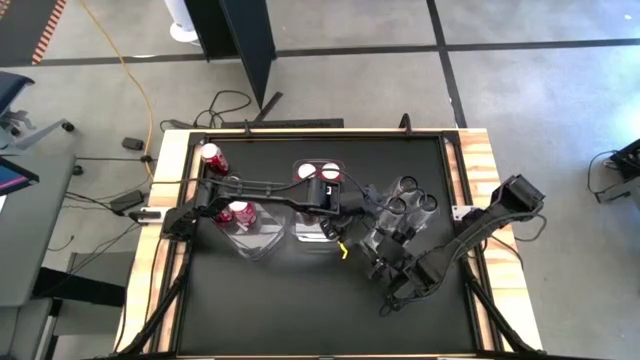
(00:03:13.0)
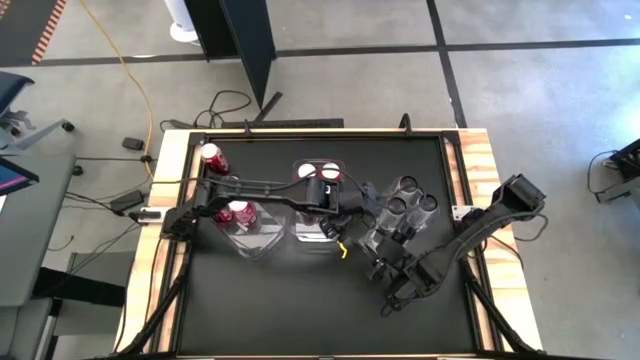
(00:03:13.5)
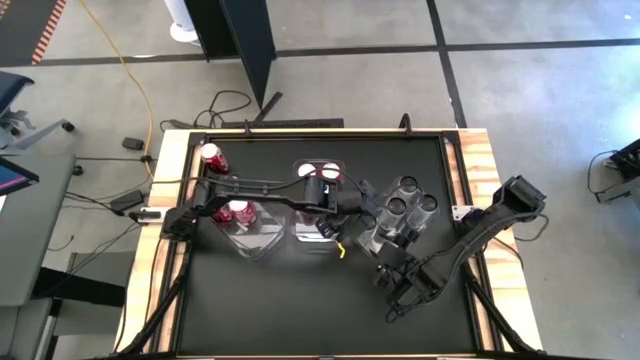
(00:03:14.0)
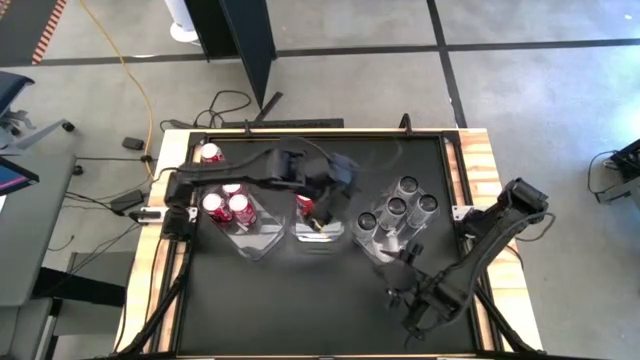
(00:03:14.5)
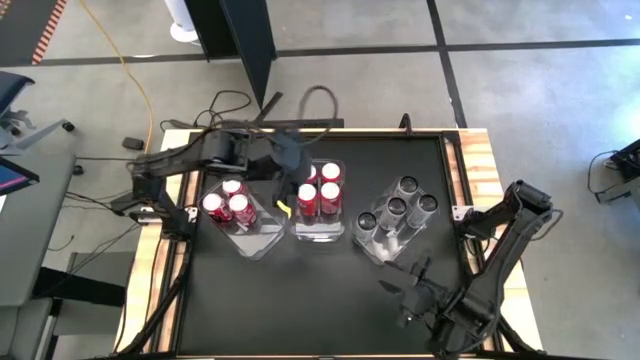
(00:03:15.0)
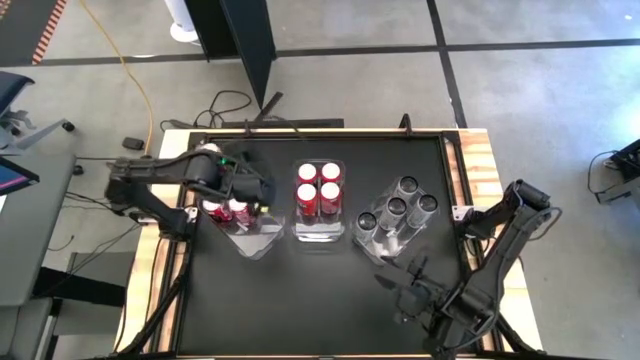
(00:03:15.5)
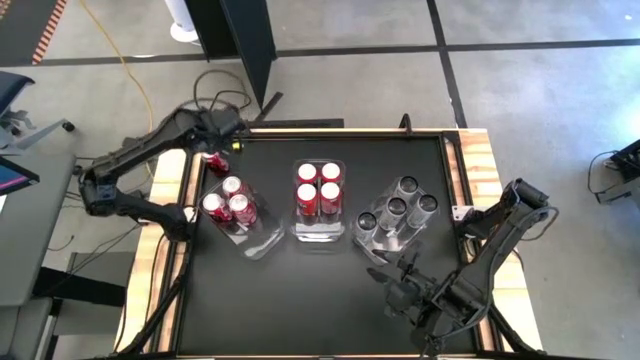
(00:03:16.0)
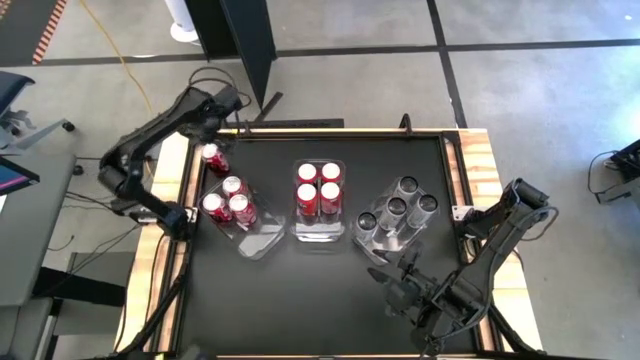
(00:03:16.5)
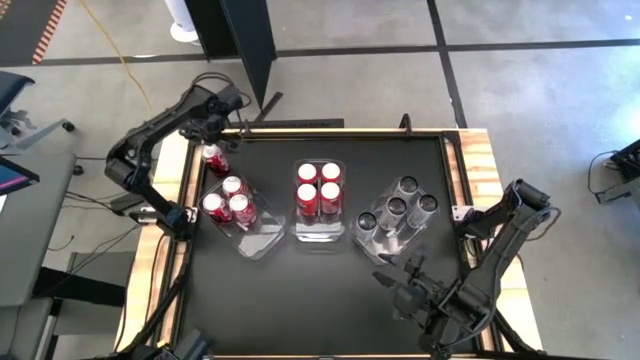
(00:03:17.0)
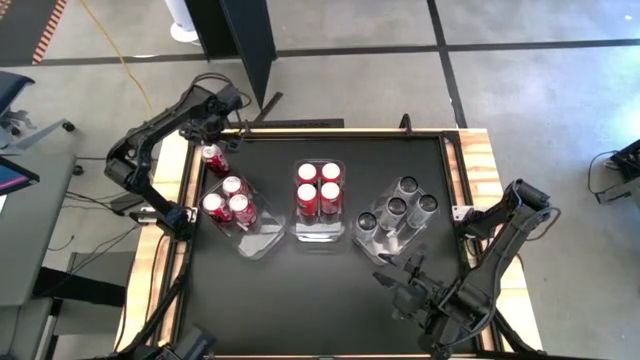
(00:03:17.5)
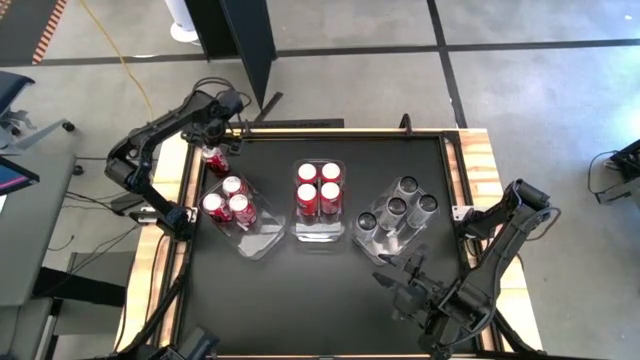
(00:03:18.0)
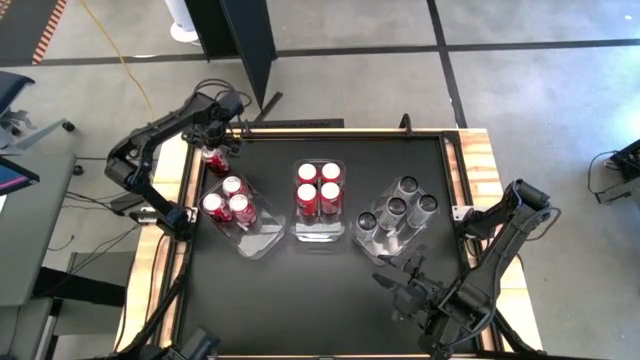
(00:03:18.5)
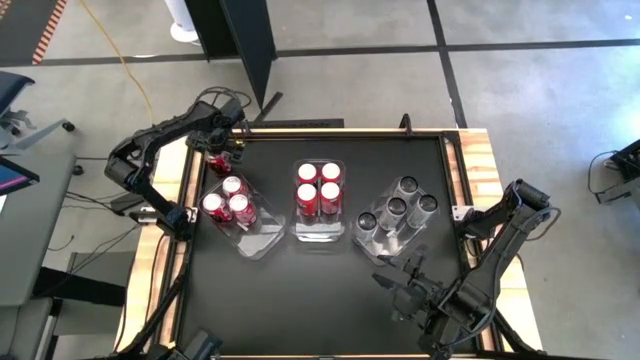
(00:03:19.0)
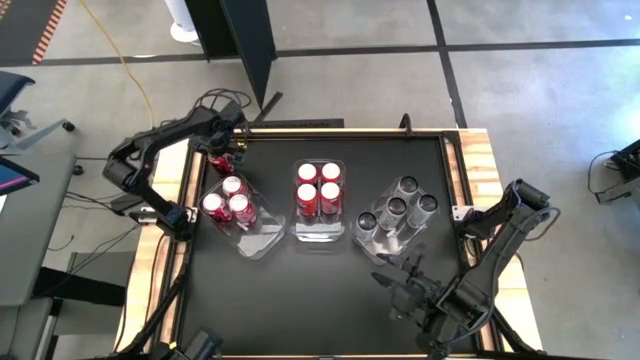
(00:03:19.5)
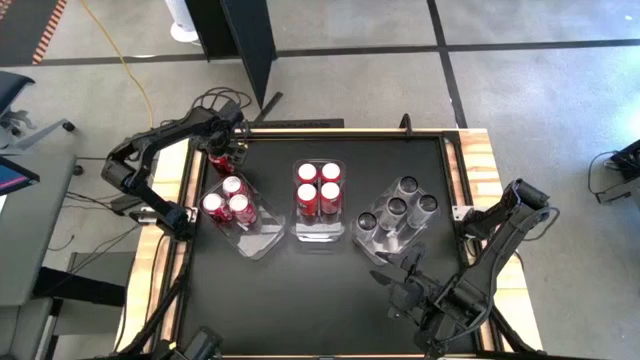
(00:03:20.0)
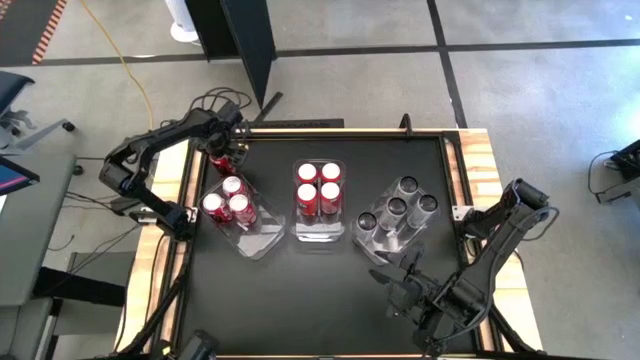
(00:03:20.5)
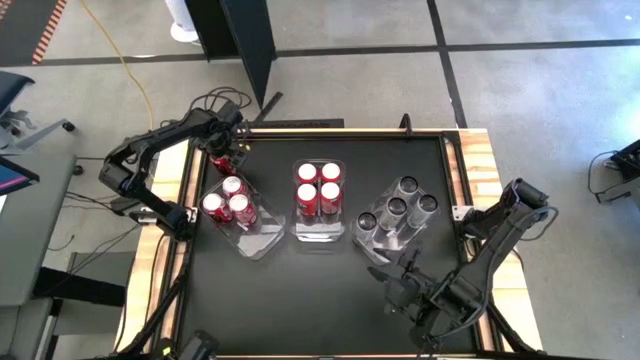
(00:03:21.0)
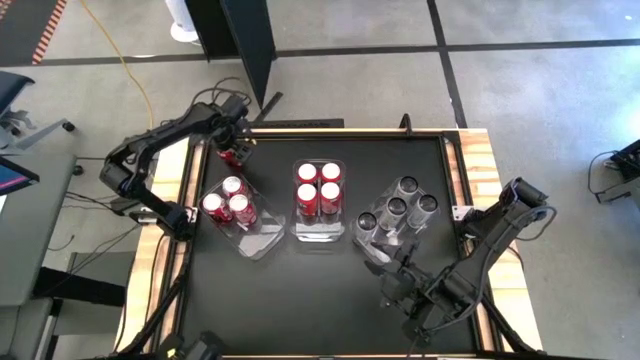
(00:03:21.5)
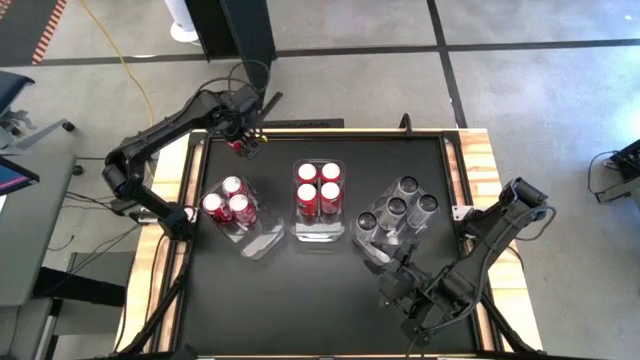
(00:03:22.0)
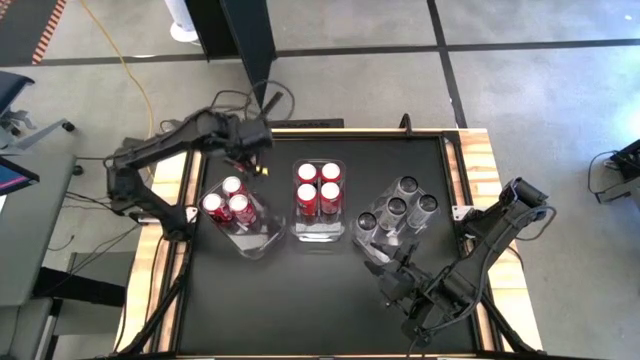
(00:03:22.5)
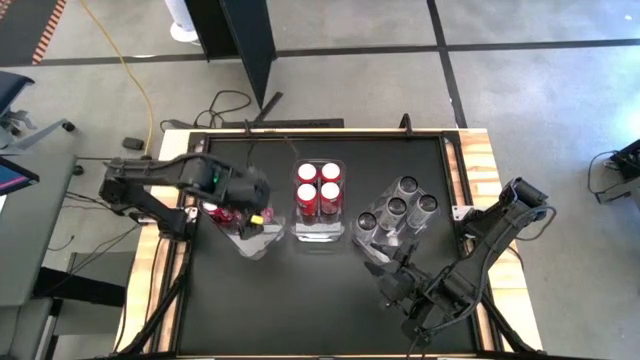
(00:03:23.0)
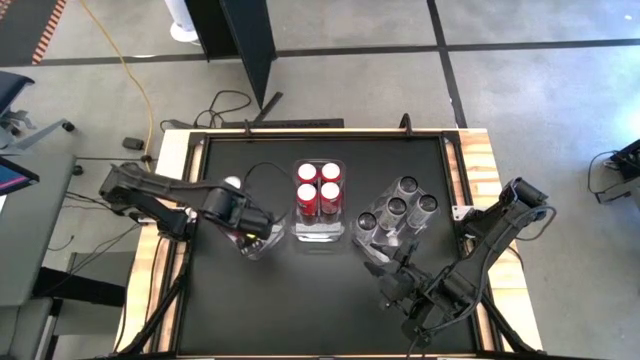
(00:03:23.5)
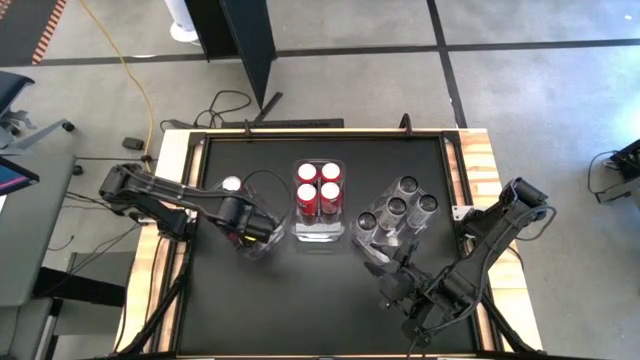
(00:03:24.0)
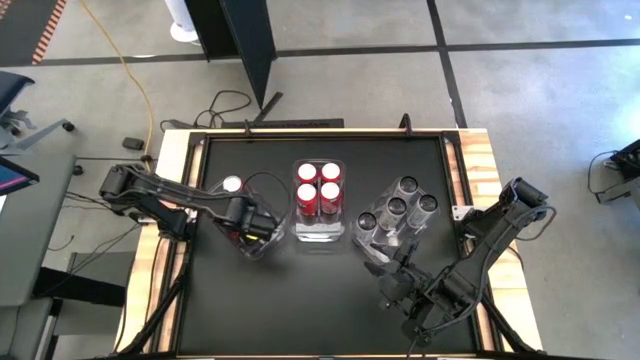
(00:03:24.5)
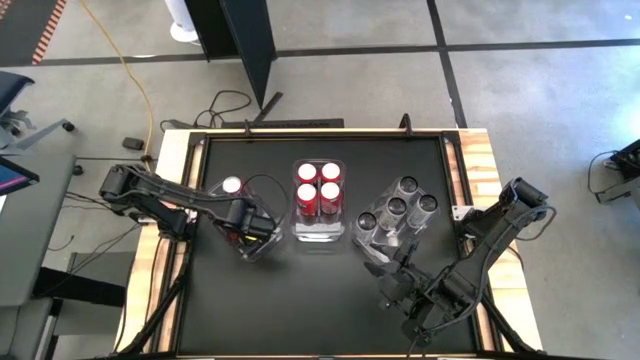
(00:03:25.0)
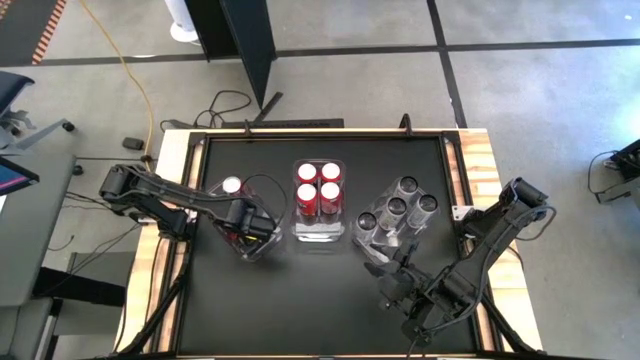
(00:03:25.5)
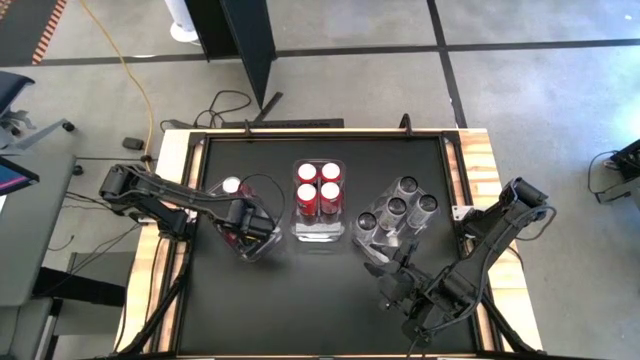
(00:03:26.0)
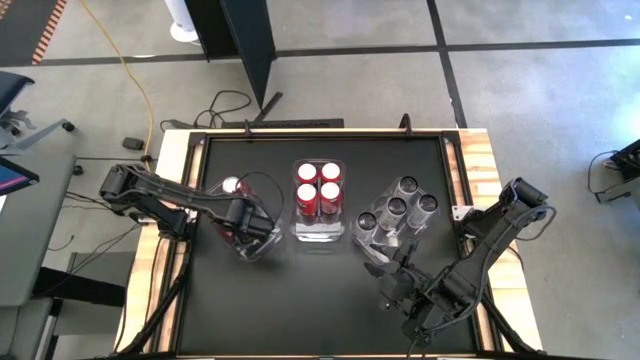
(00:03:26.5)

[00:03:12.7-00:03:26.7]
Task: Sort soda cans
Put the red soda can into the left transparent bin

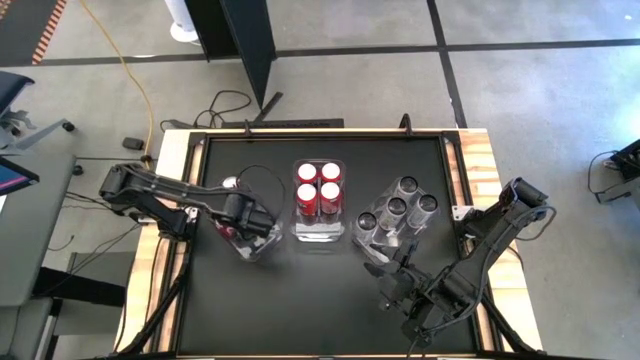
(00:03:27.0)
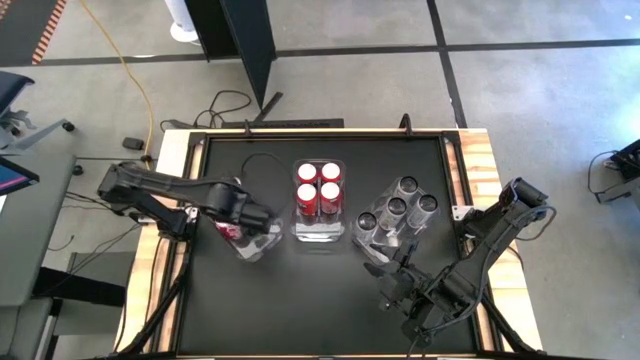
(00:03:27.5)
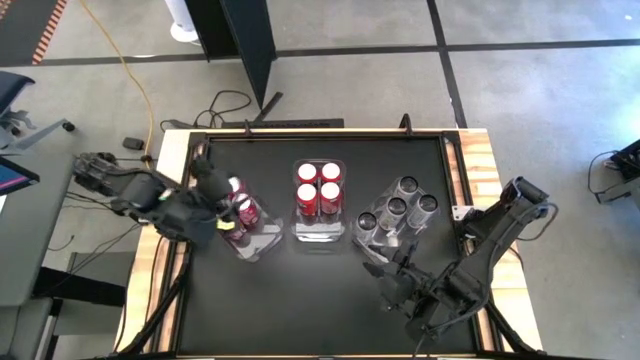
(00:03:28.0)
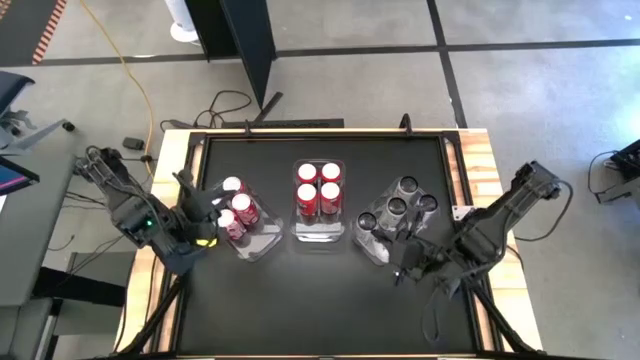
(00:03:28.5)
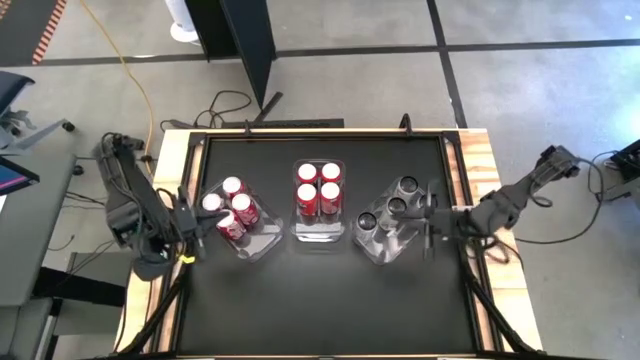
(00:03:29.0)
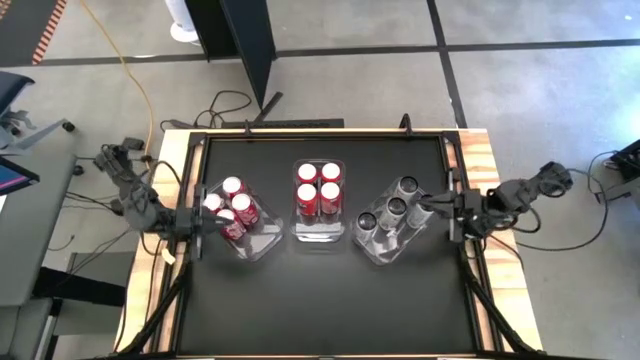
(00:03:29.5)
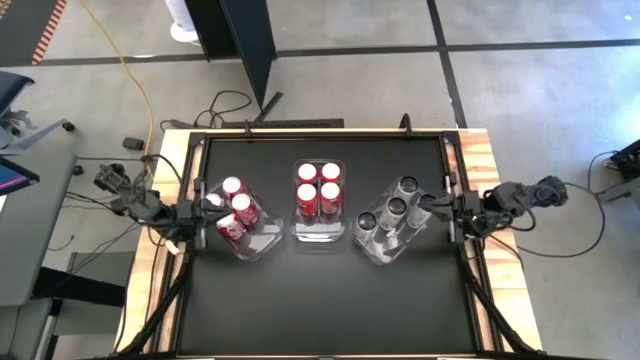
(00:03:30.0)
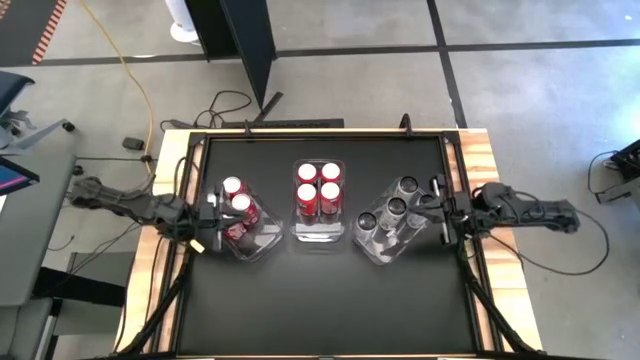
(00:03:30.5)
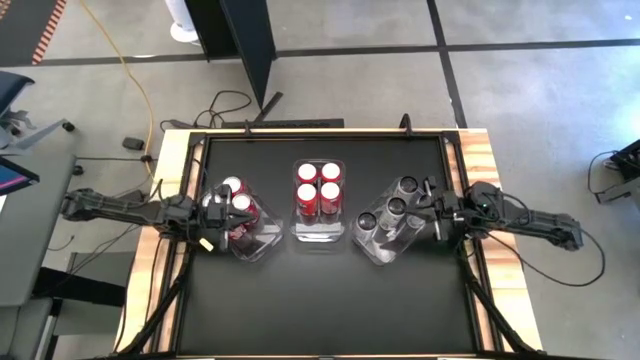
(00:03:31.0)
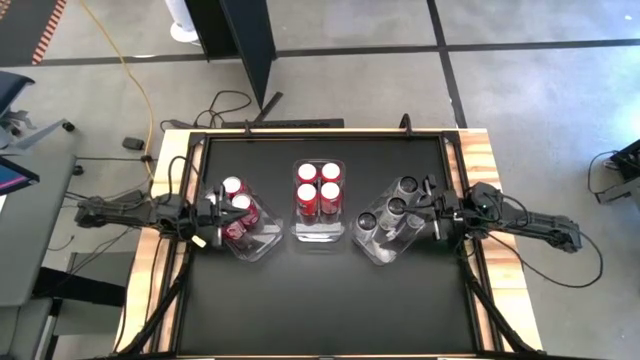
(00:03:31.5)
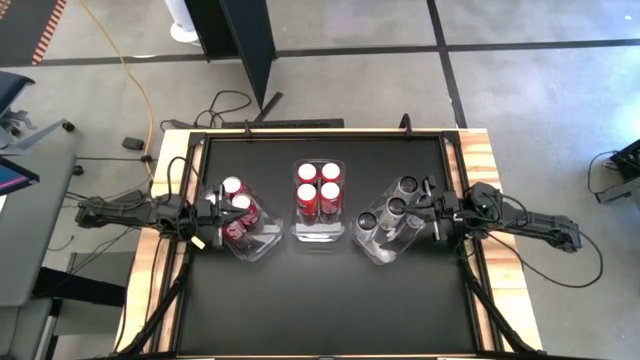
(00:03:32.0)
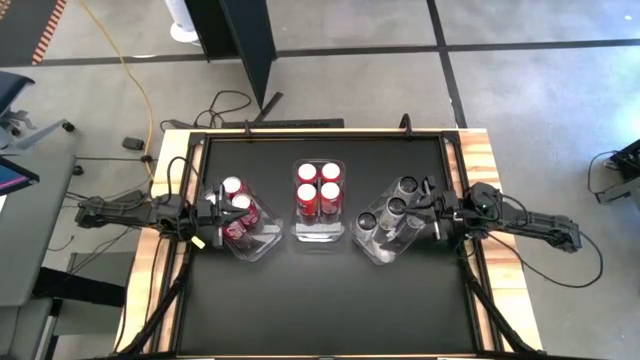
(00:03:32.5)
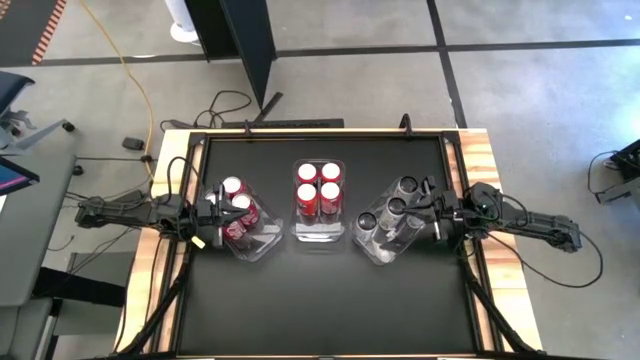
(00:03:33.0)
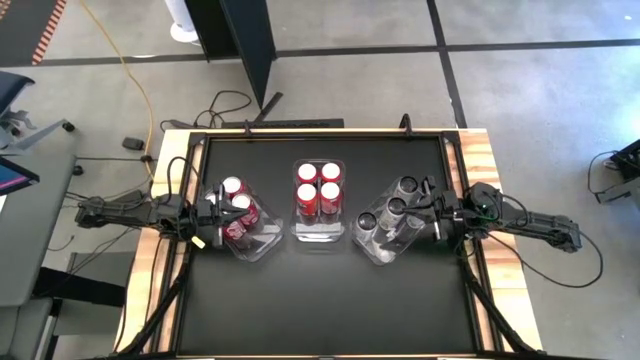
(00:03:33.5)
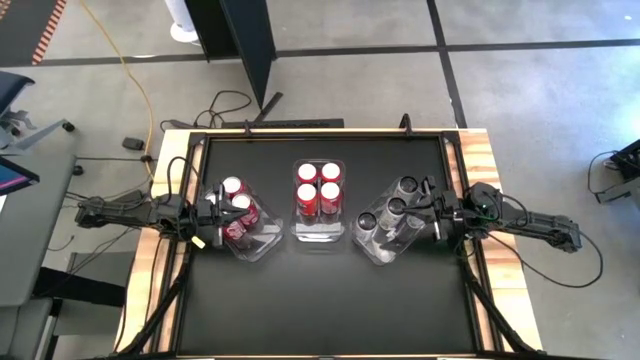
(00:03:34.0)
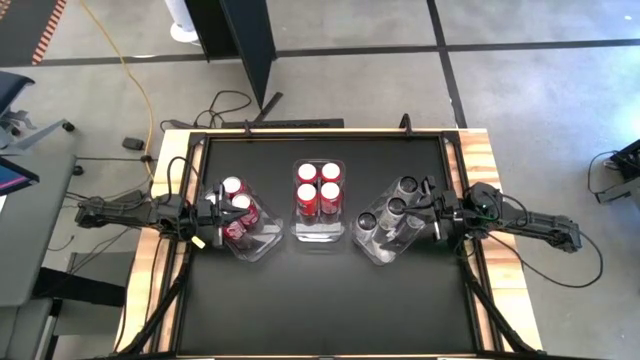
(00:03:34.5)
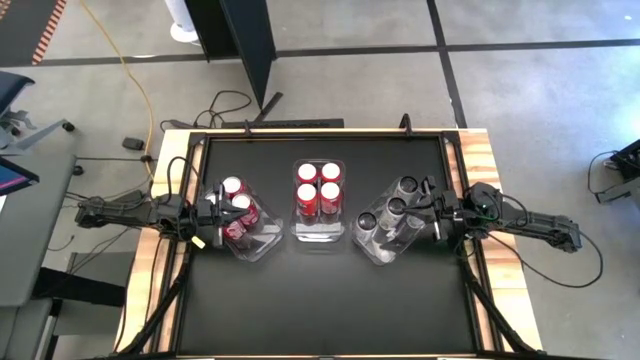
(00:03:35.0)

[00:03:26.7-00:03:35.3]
Return to Home Position
